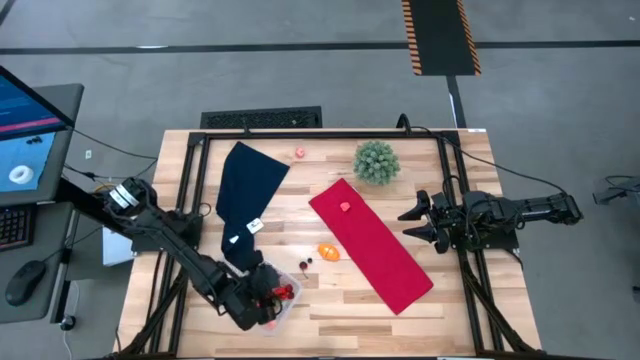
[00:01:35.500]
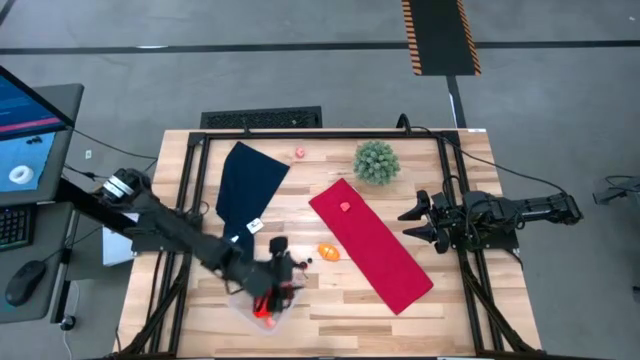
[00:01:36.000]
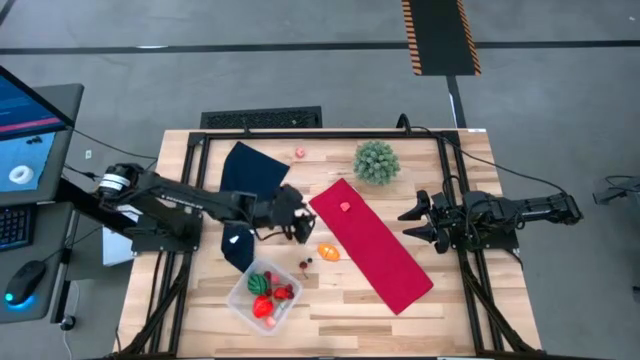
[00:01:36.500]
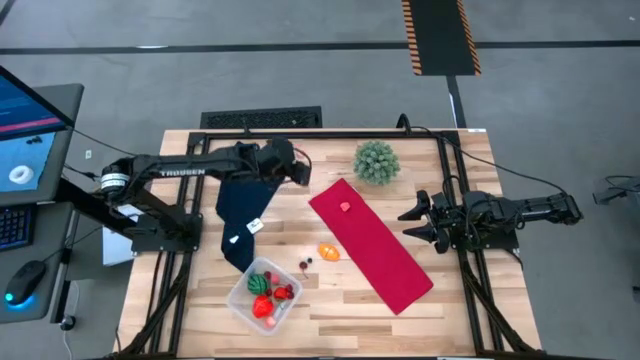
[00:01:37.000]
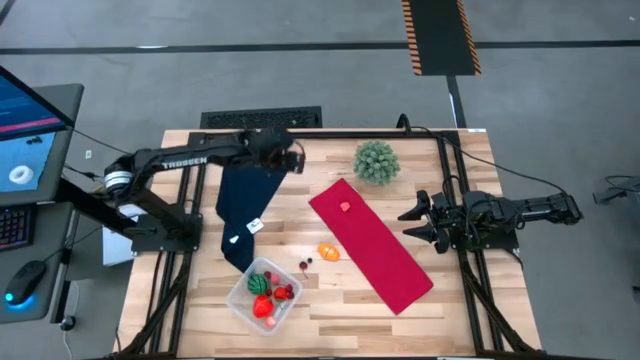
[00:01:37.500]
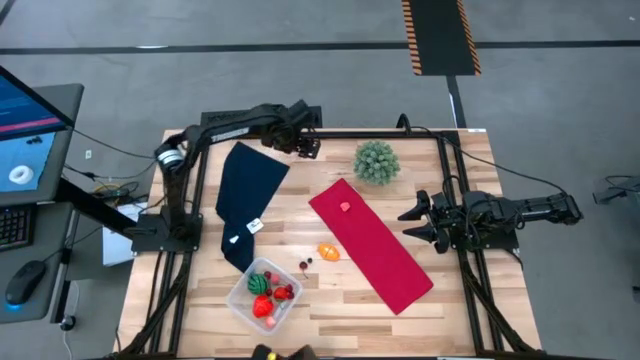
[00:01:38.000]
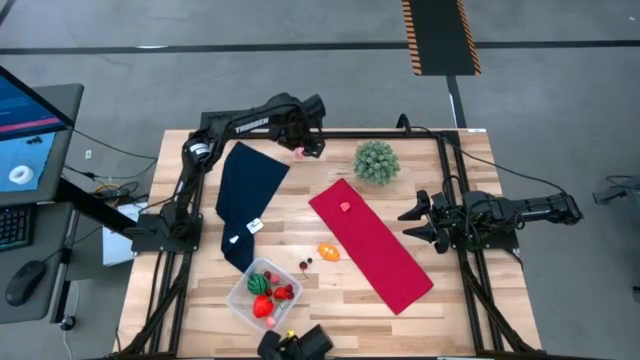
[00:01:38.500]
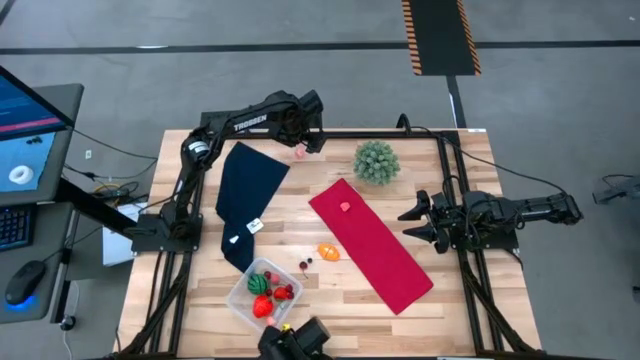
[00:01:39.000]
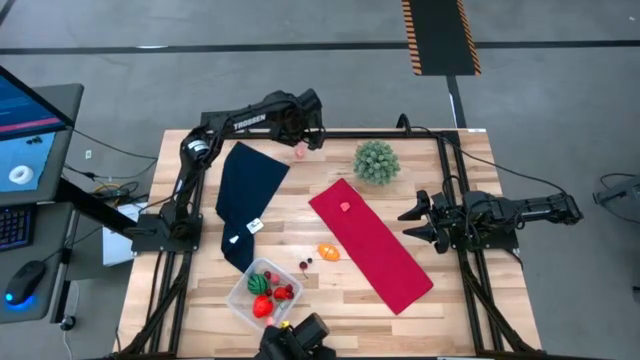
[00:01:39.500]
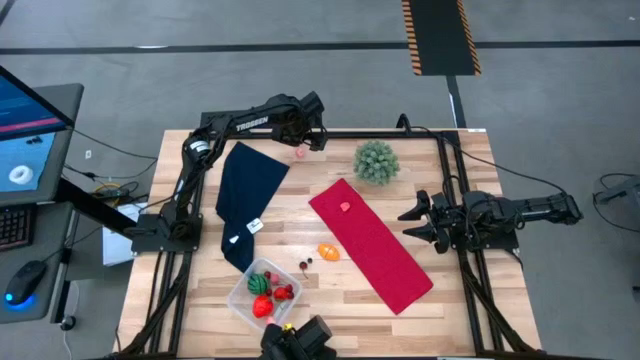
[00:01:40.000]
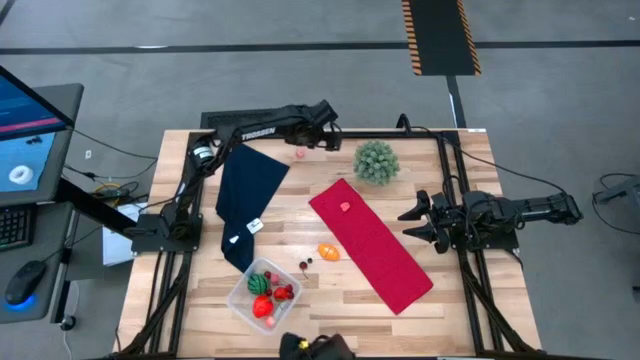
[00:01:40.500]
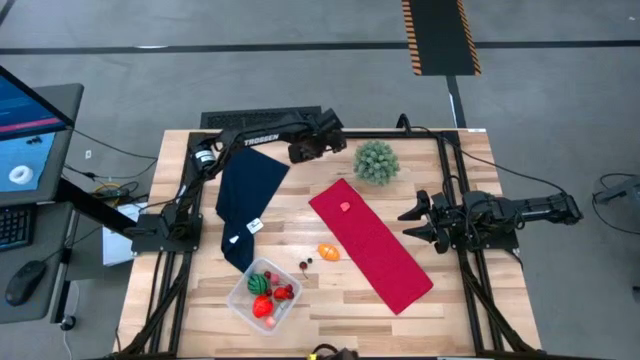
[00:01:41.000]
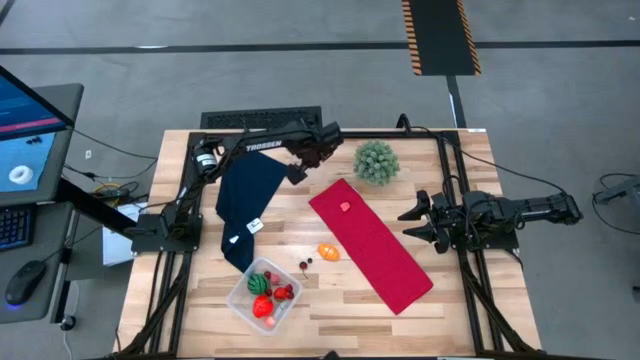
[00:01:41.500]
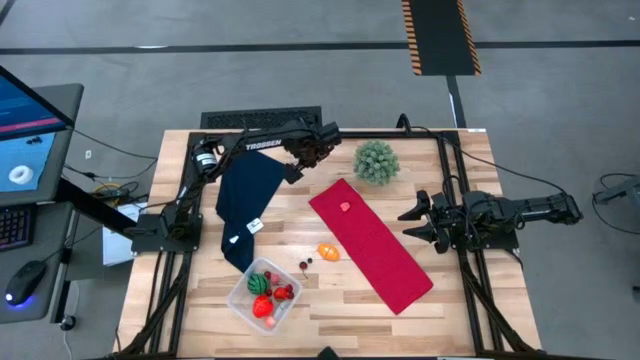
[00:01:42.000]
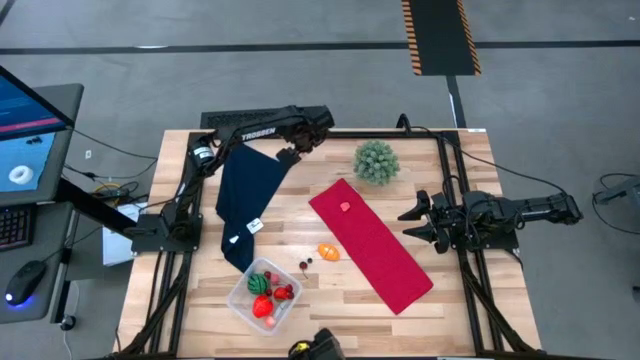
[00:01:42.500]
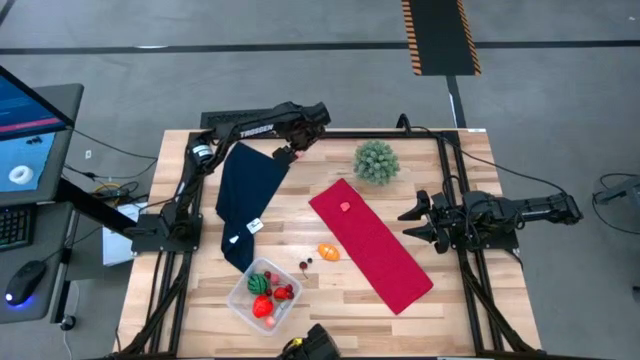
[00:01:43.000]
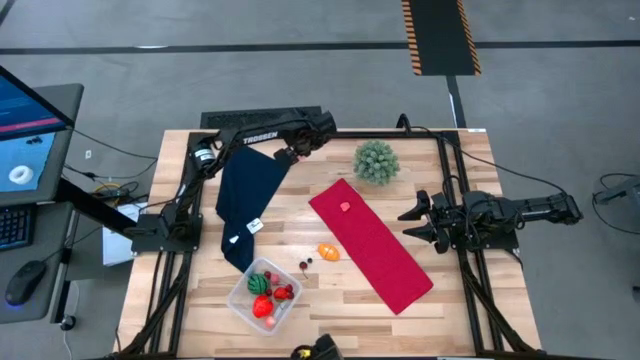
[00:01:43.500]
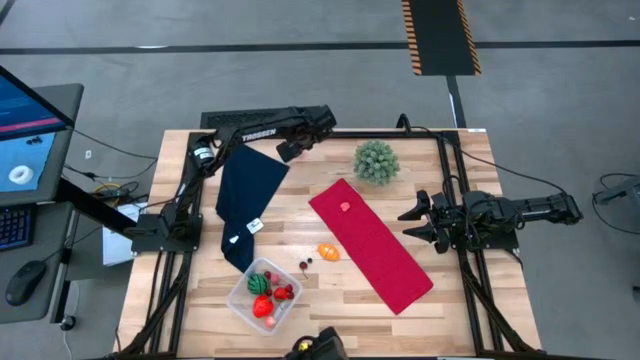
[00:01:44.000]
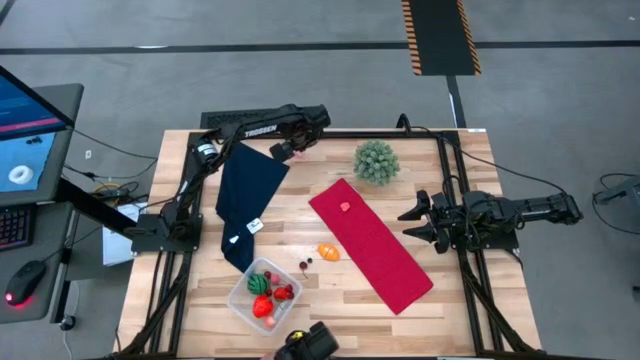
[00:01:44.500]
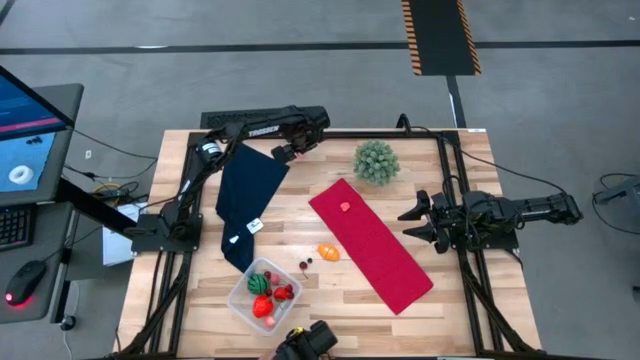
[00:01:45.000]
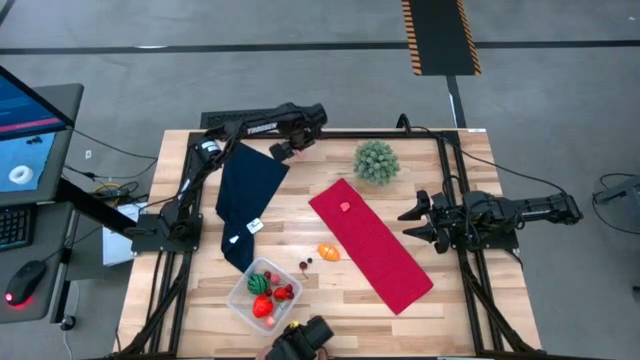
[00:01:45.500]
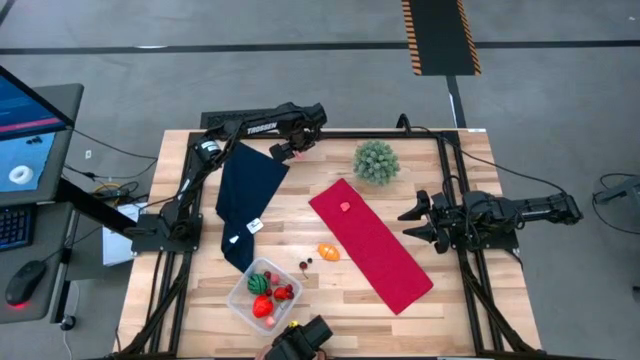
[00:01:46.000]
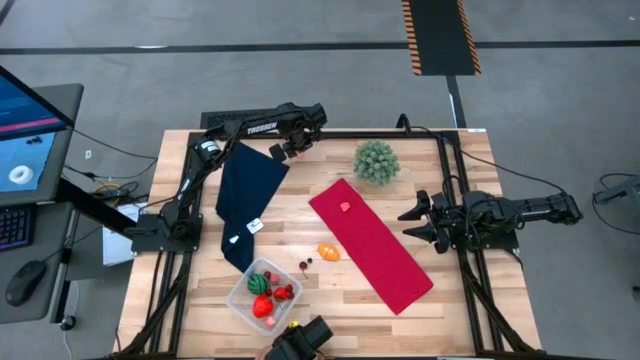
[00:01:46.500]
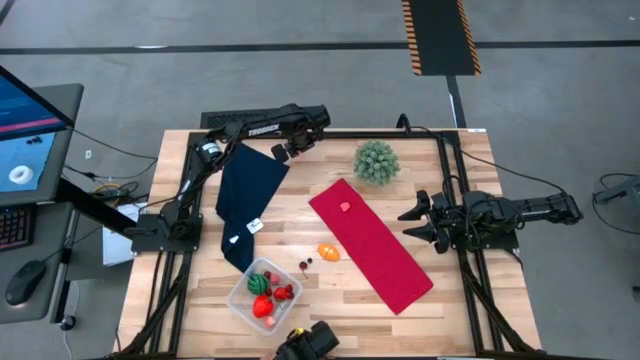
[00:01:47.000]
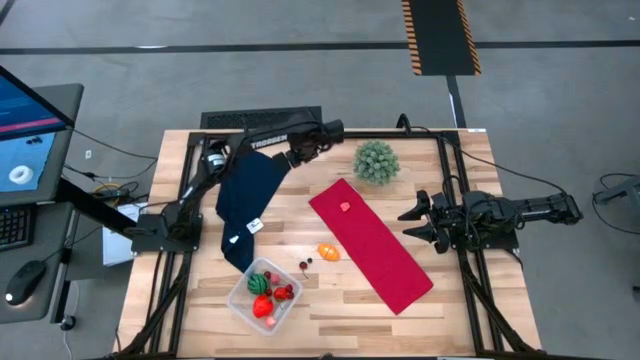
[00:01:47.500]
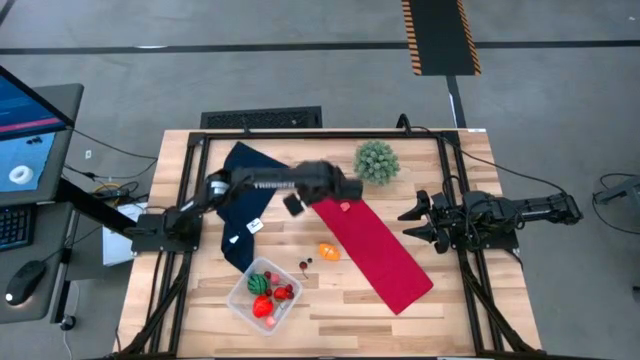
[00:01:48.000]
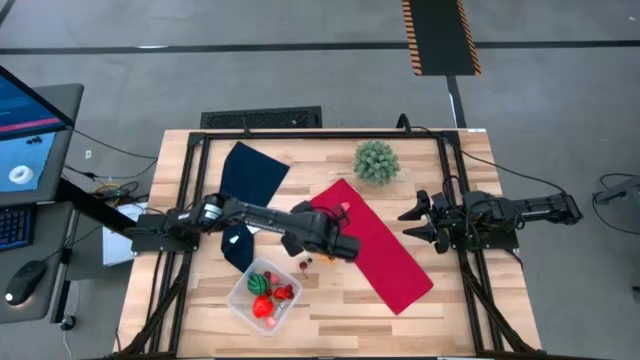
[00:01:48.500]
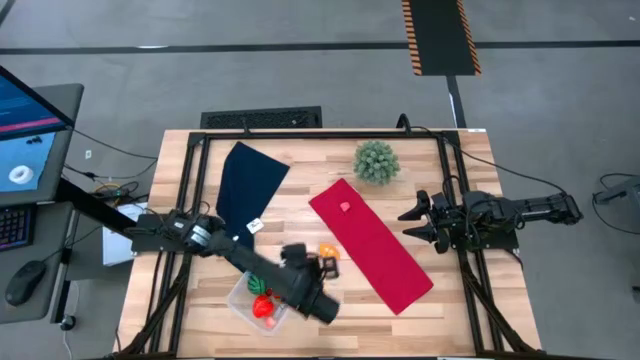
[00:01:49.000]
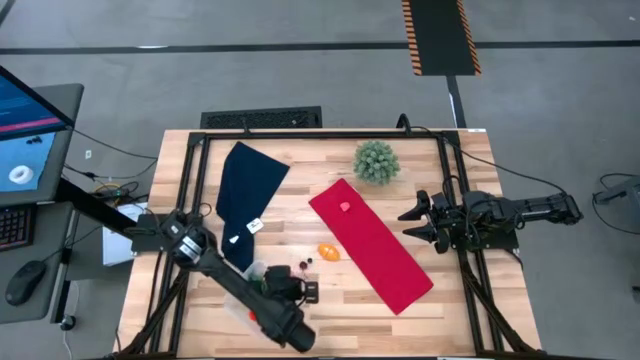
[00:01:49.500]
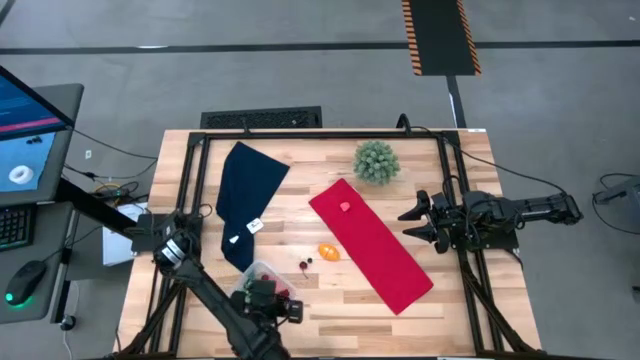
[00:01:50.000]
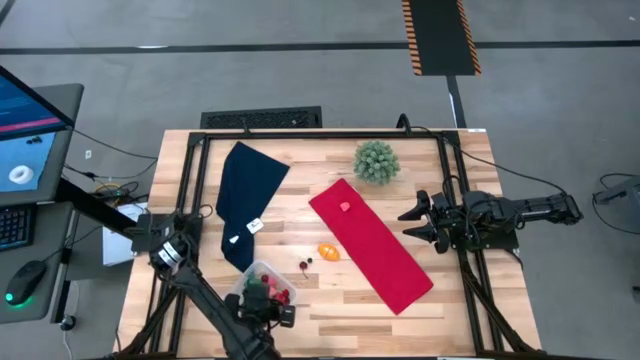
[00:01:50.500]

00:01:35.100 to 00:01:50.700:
Task: Pick and placing Produce into tupperware
Put the peach into the transparent bin

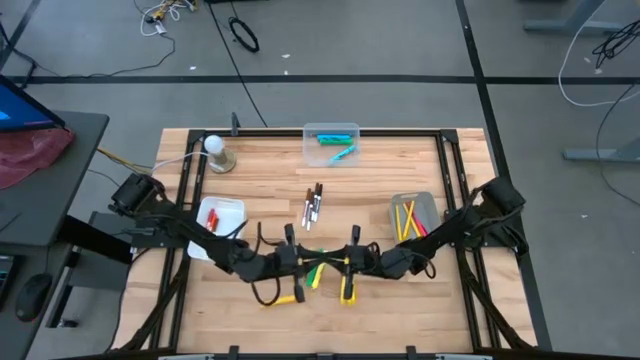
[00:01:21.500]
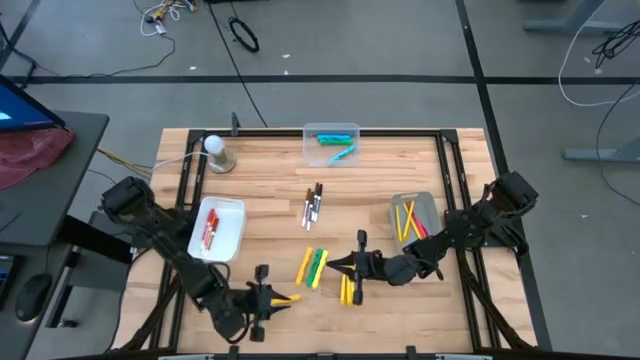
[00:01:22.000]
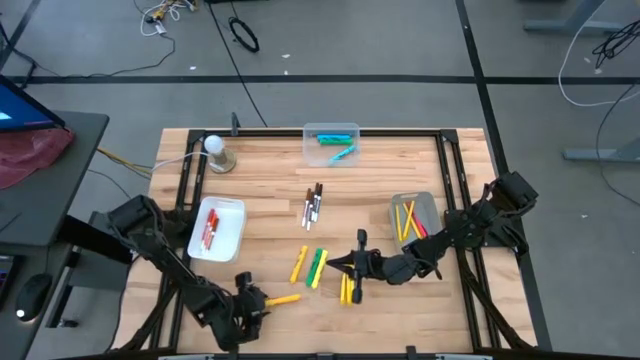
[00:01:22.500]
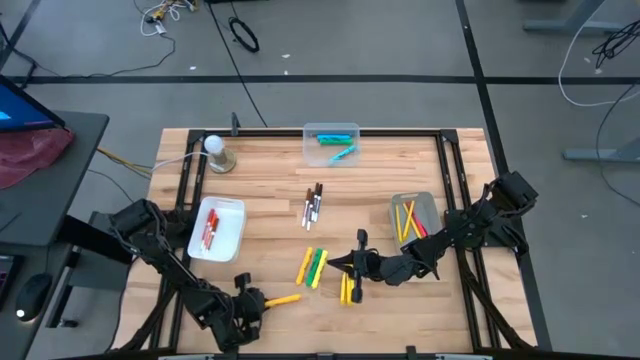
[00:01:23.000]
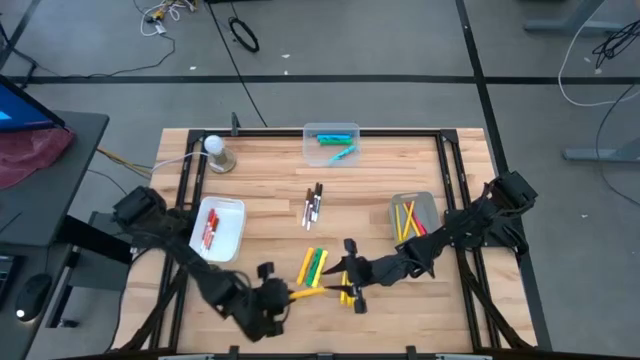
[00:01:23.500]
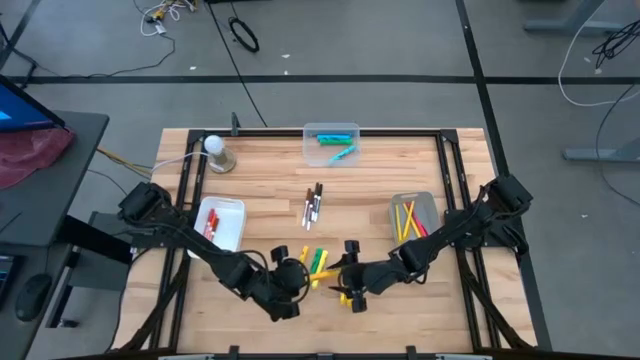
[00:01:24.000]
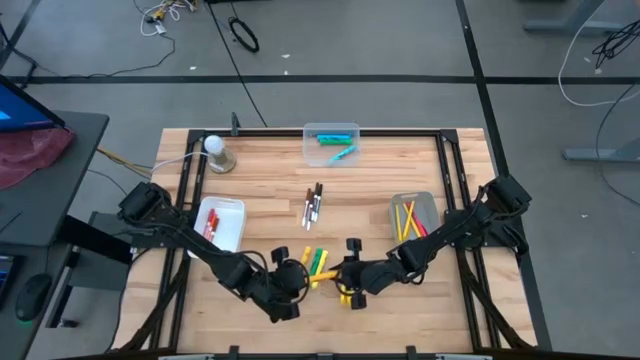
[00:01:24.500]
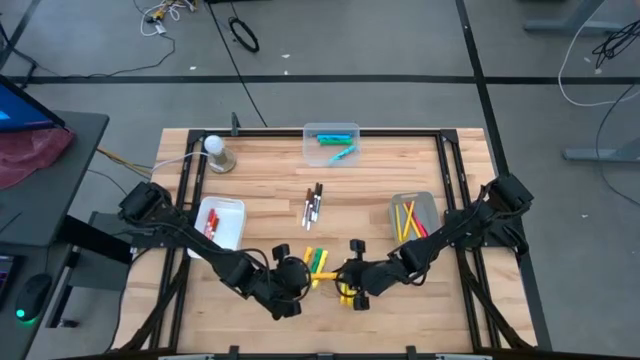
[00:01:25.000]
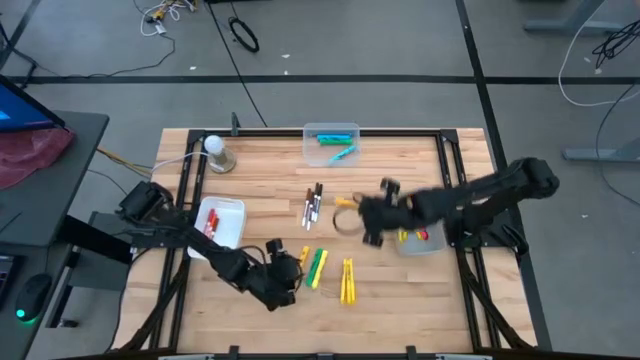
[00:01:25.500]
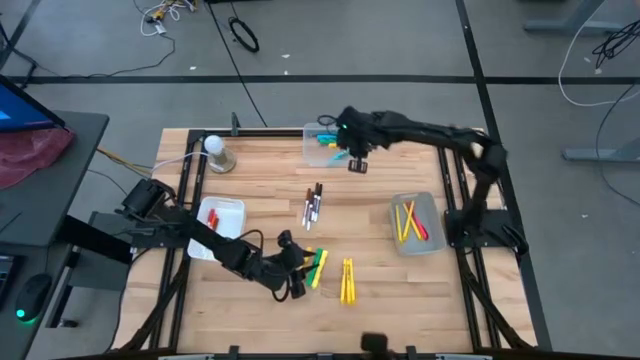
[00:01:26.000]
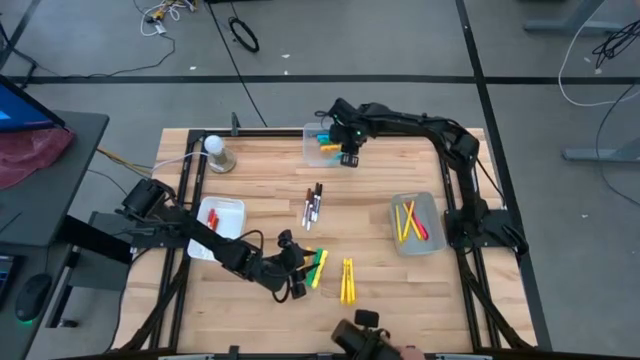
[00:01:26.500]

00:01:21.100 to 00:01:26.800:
Task: Pick & Place Markers
Put the yellow highlighter pen into the transparent bin
